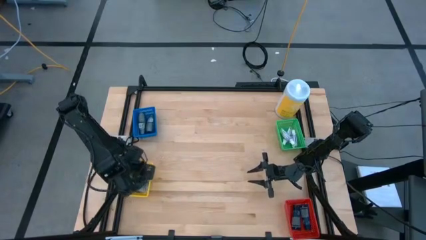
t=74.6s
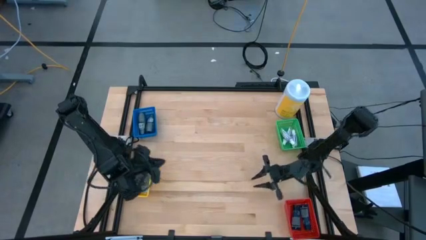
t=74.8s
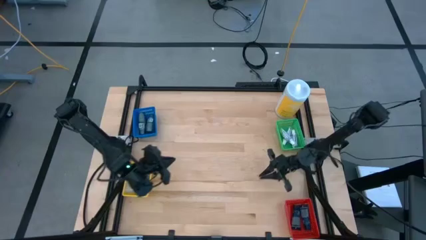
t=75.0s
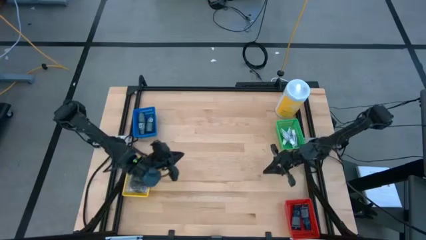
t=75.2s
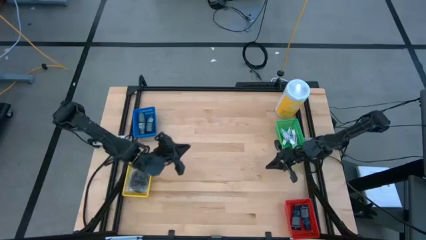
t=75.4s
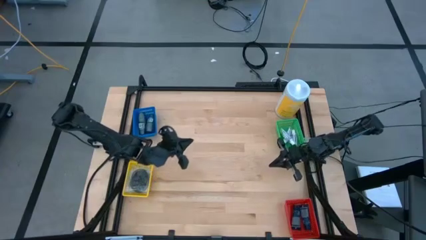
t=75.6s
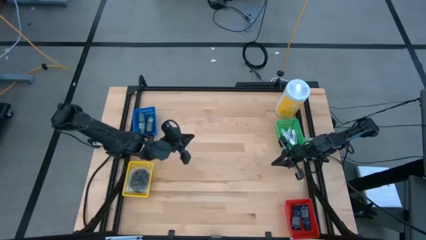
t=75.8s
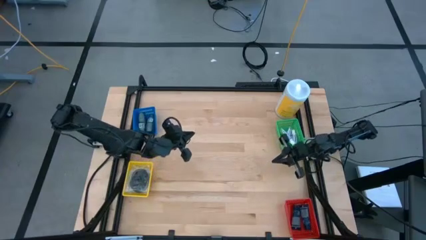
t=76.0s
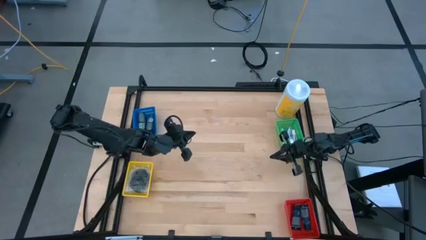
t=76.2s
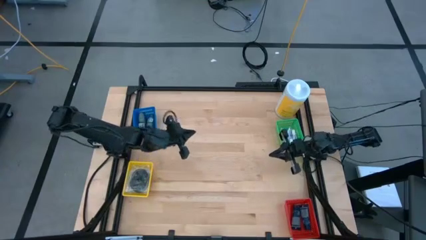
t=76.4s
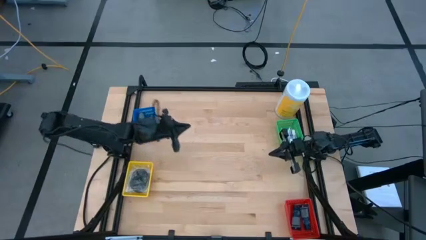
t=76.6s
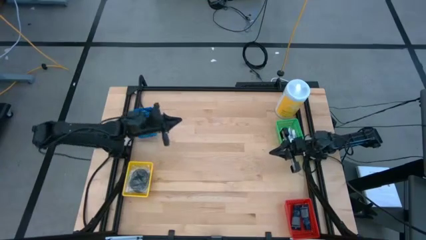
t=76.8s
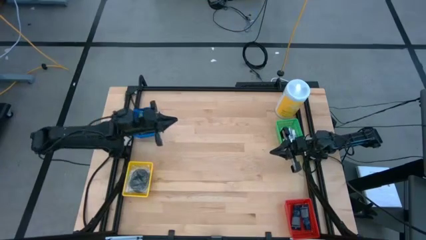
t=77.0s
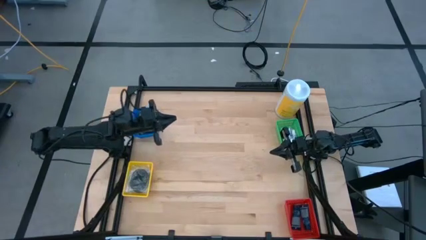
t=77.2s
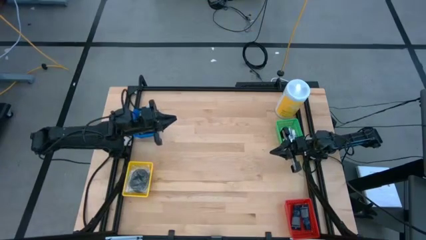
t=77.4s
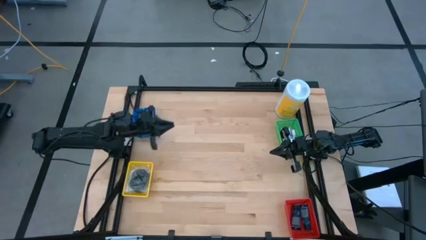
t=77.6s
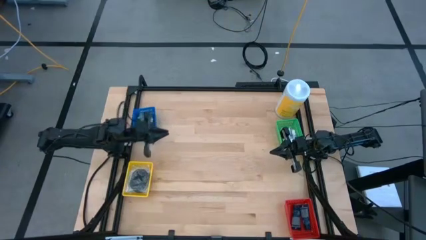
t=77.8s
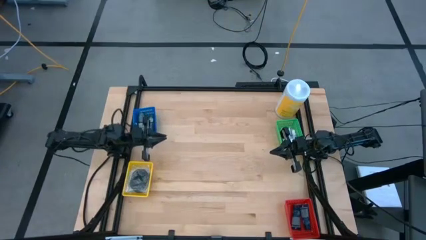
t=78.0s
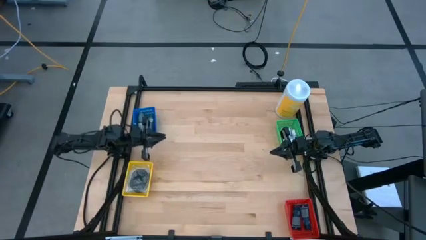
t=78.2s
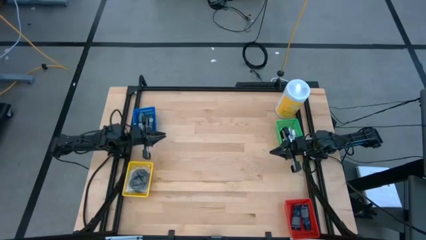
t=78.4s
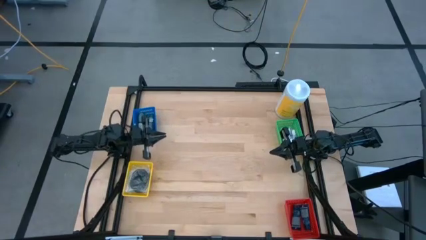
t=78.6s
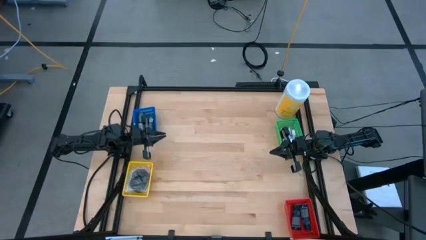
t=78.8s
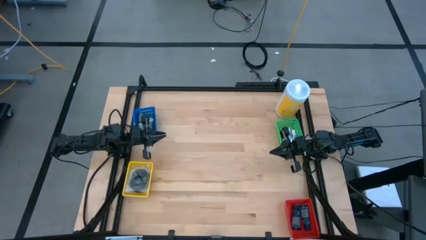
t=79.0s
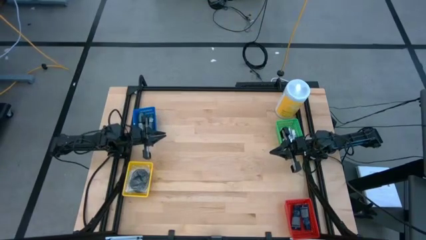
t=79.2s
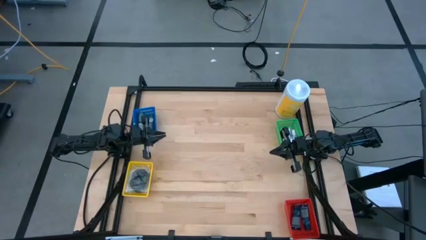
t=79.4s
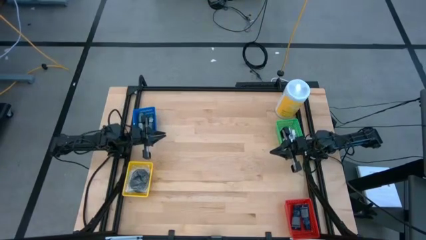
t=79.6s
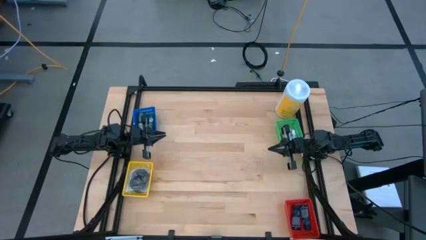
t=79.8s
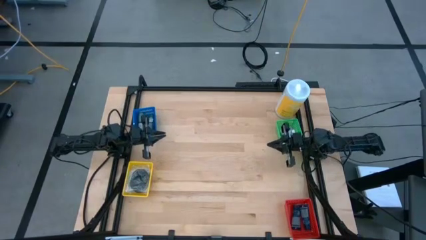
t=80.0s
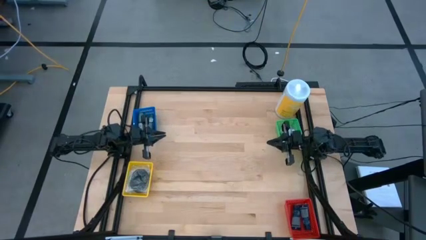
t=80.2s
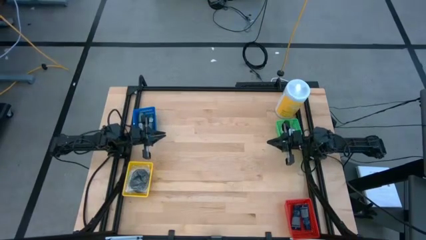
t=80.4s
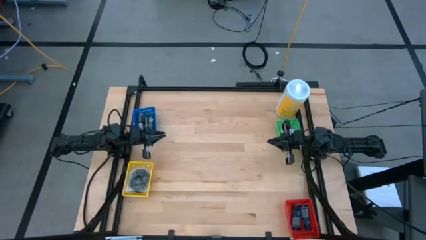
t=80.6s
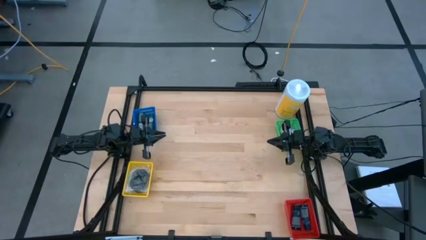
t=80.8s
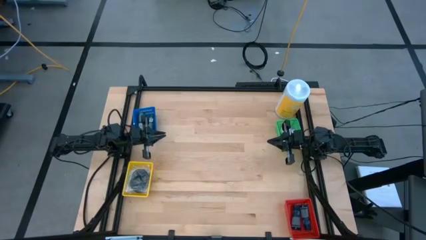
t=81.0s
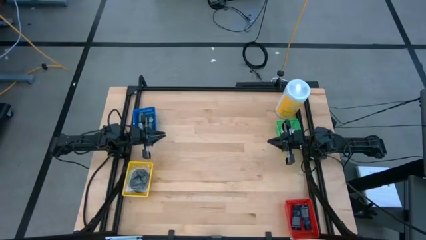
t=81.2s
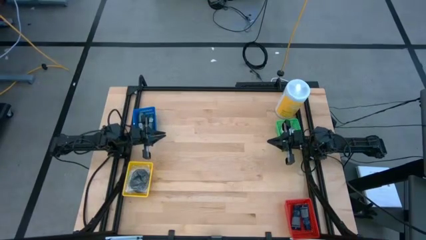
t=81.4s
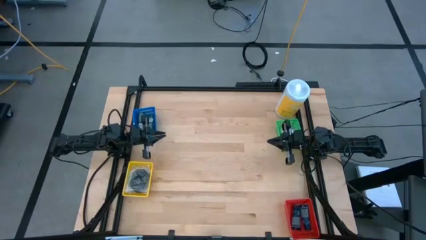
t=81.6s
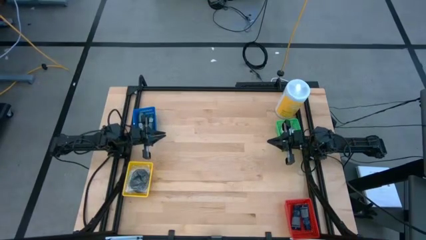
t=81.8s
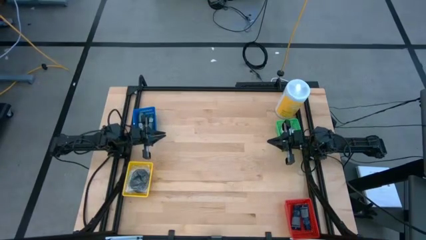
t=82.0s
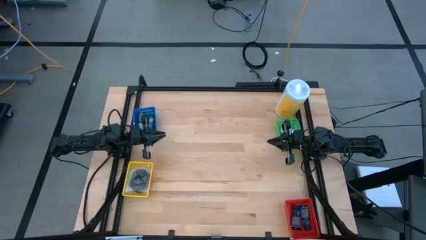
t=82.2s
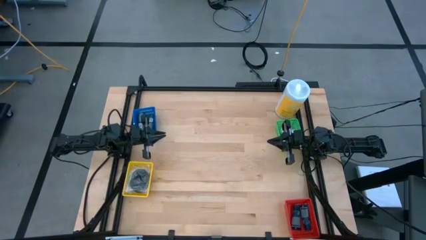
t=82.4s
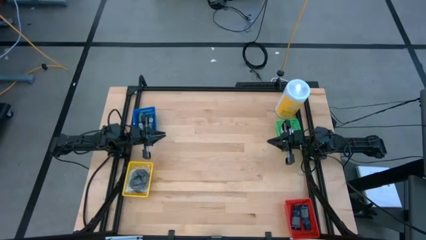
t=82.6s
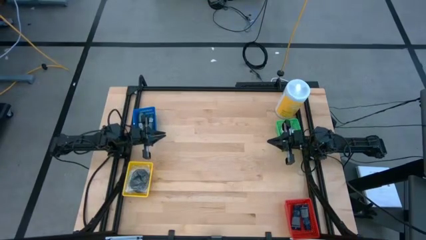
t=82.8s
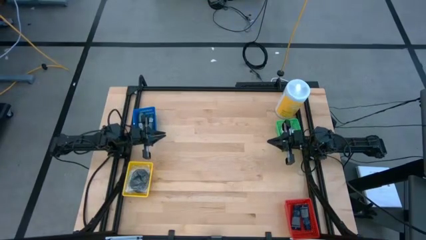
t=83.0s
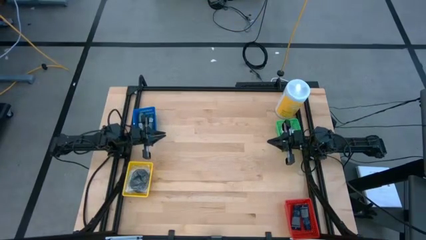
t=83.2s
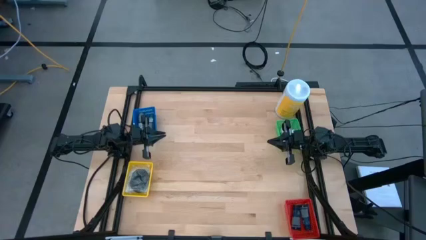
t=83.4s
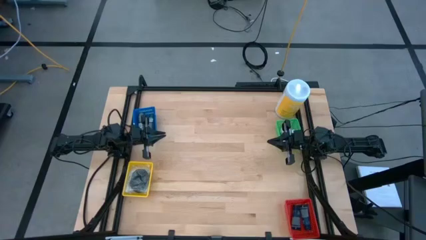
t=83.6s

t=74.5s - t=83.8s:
Task: Pick & Place Travel size toiletries
Return to Home Position

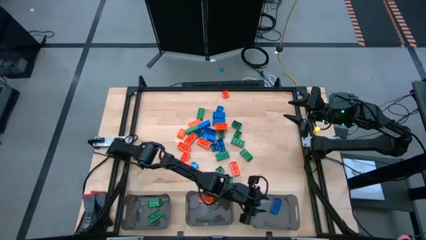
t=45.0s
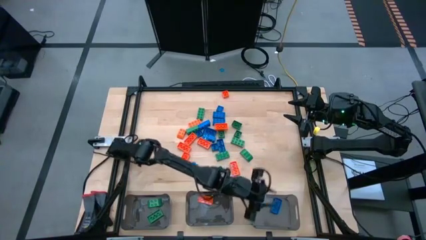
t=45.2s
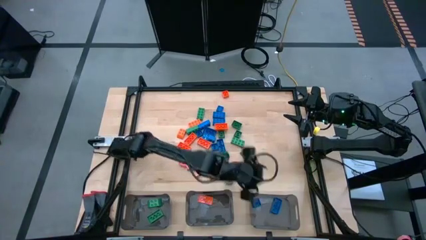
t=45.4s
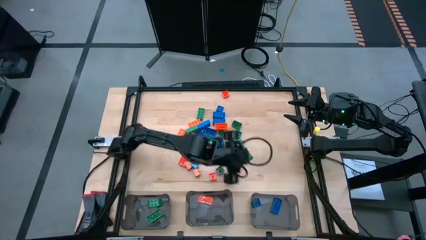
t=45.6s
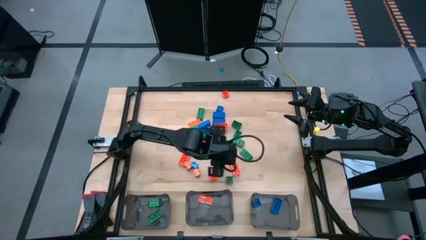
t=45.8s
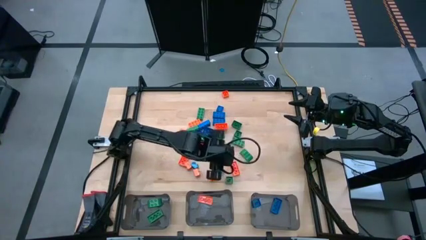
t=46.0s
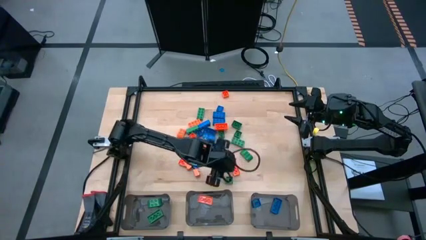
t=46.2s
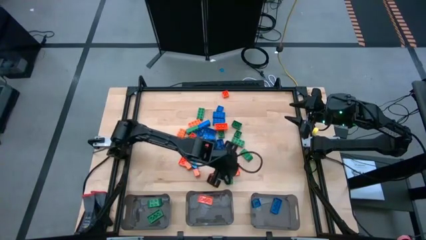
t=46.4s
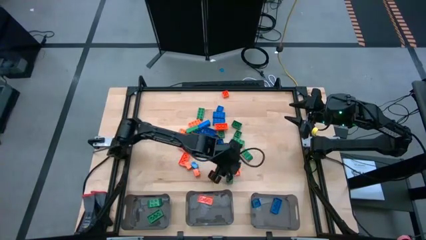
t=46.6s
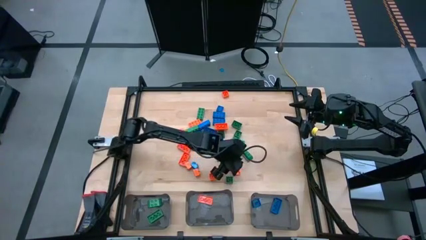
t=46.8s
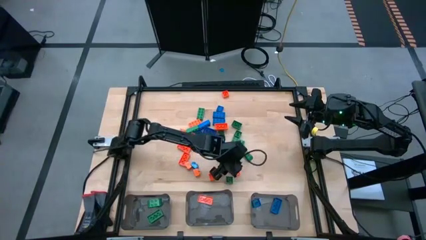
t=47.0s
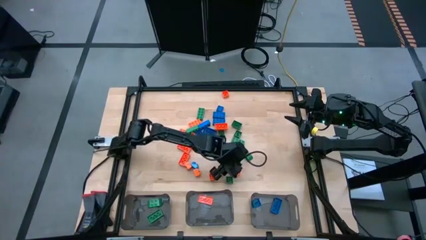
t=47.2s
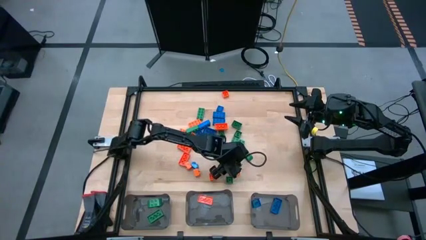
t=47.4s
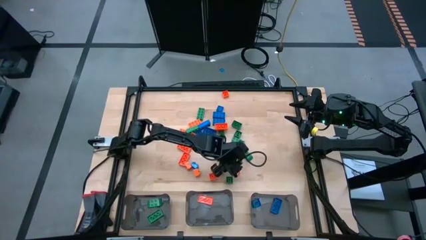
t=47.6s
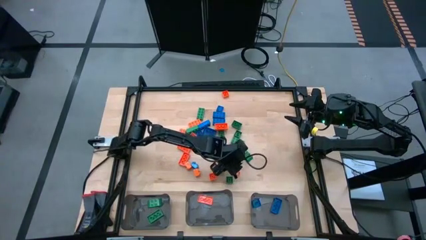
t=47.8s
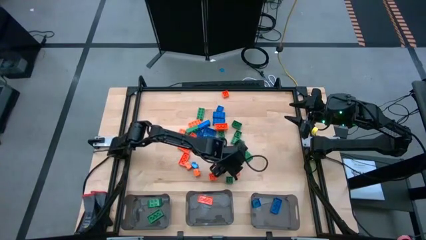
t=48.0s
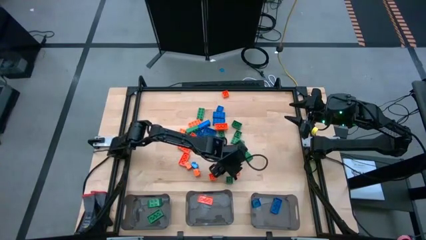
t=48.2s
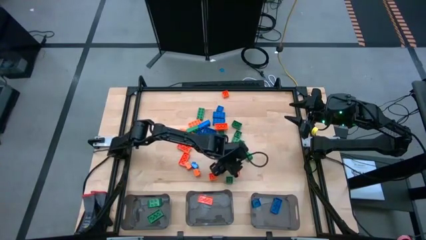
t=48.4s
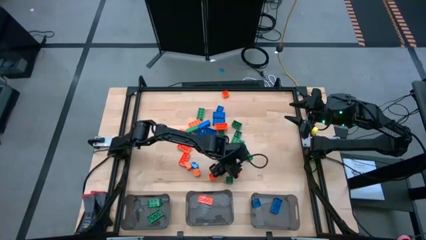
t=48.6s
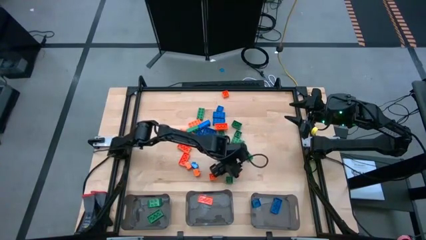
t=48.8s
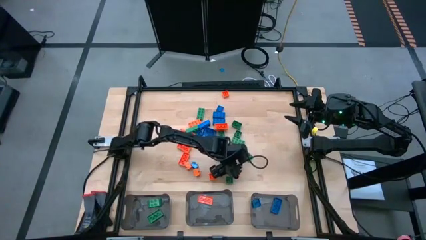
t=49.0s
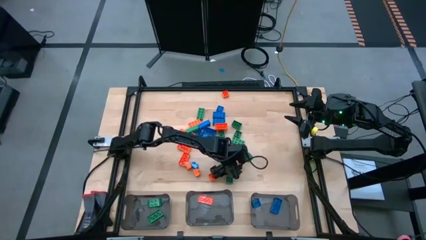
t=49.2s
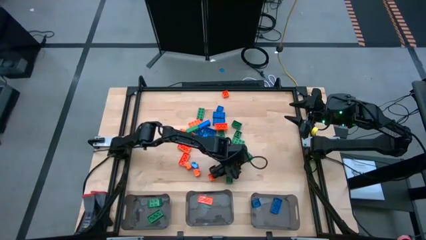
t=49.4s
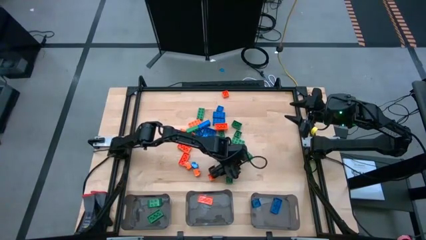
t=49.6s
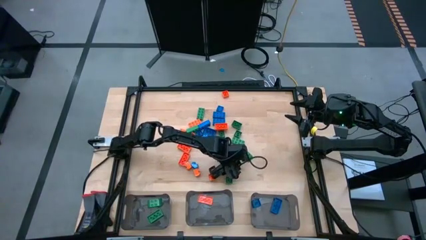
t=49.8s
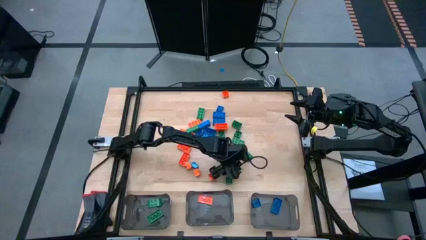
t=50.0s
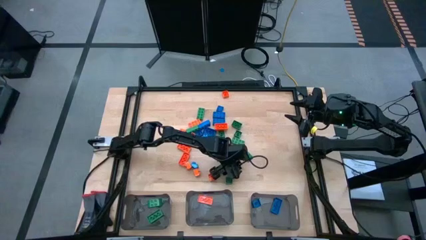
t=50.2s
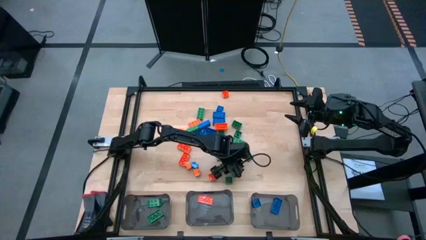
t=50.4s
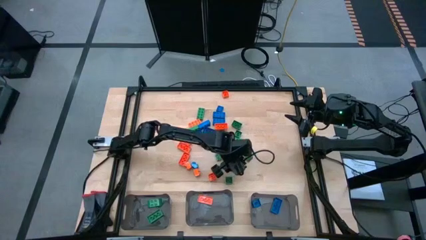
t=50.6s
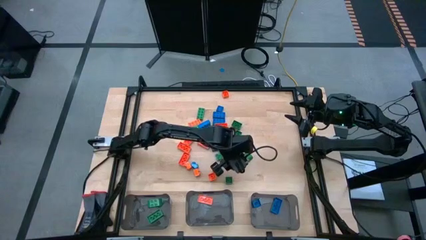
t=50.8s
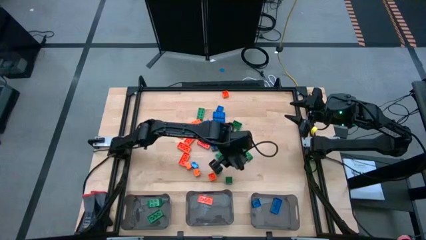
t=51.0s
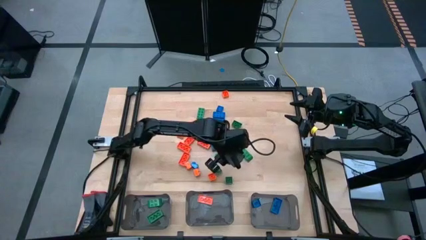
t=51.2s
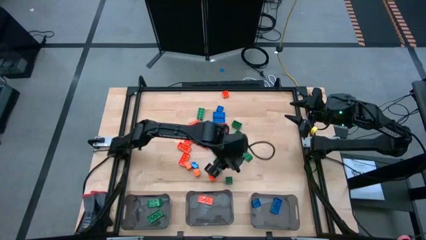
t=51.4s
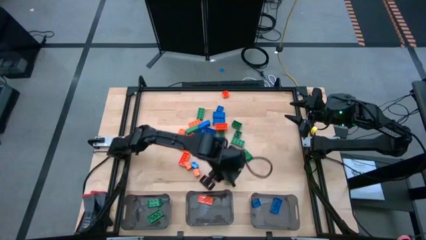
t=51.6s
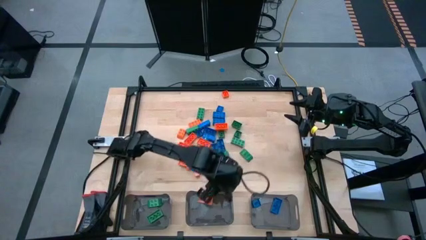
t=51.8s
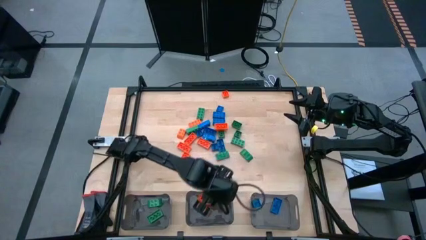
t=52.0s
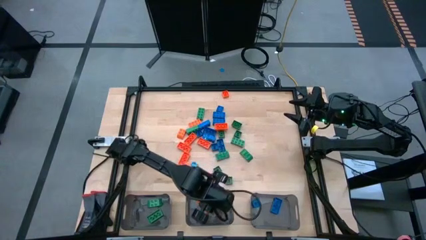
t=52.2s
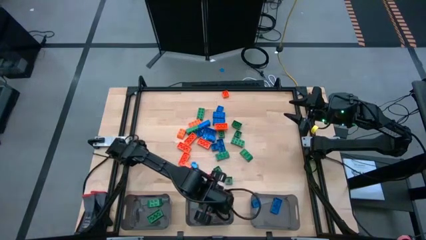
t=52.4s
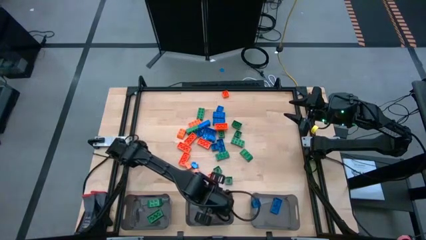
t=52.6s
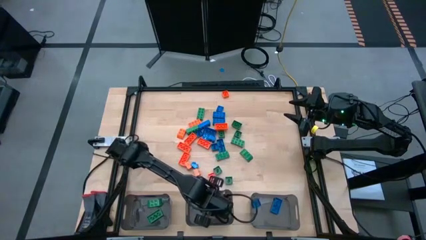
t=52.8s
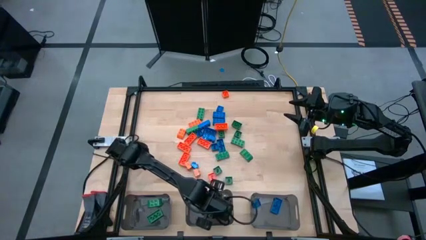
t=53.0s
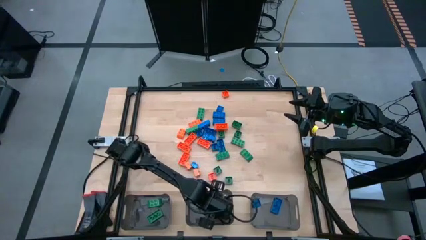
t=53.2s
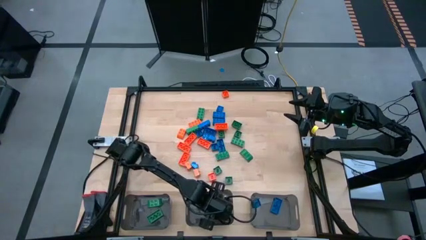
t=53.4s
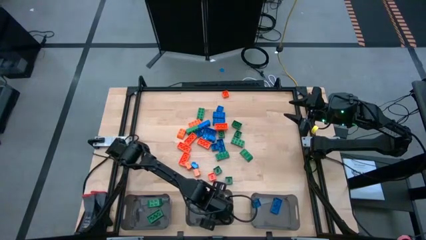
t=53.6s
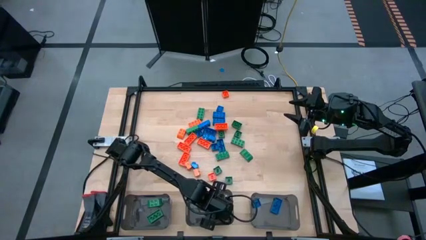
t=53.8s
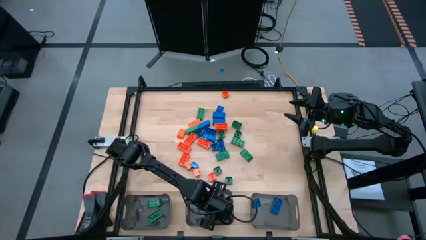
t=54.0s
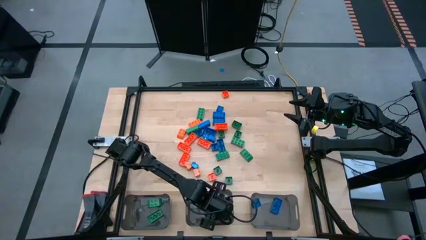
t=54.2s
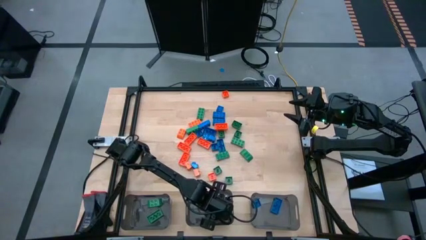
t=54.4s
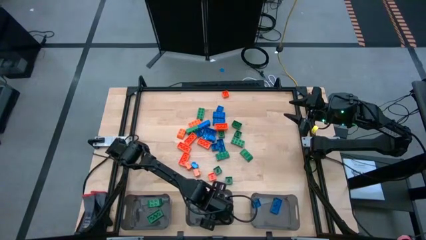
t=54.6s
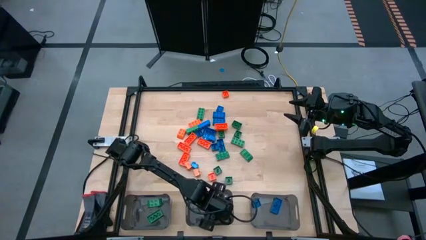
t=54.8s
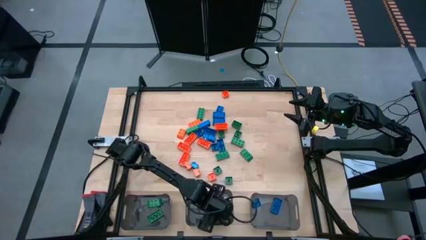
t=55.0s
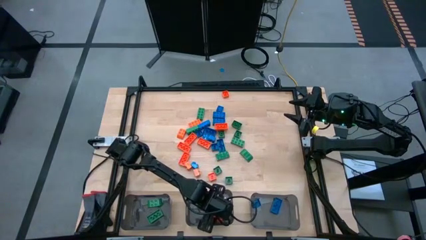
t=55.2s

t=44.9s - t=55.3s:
Task: Sort blocks
Put the orange game piece into the middle black bin
